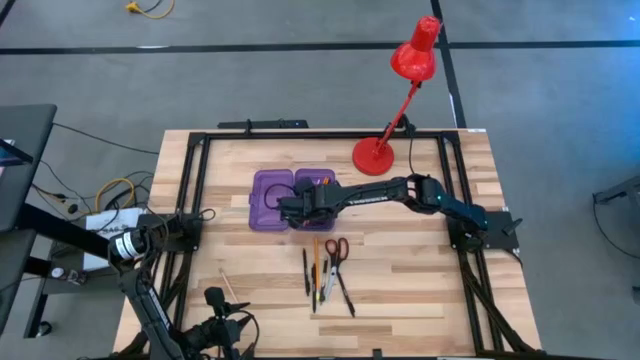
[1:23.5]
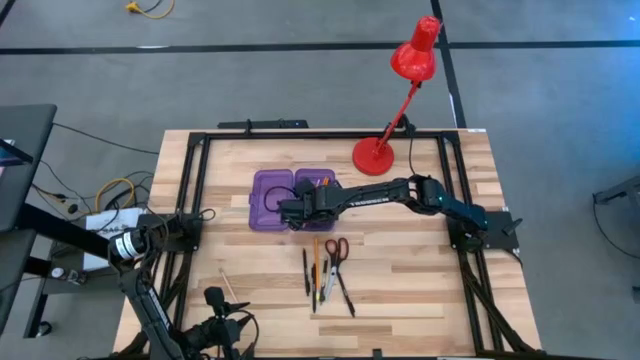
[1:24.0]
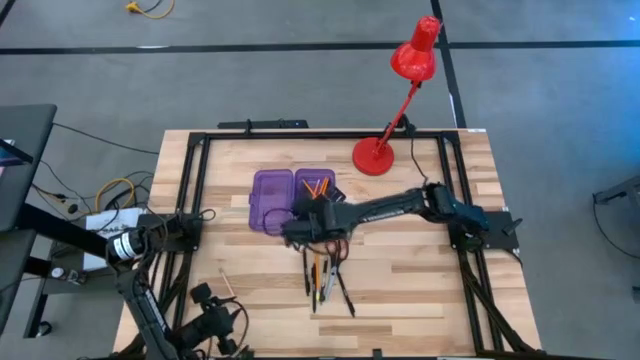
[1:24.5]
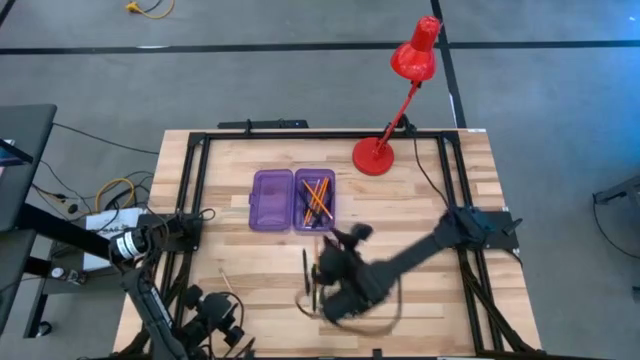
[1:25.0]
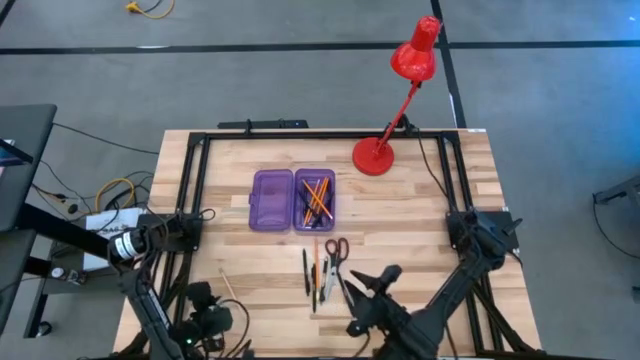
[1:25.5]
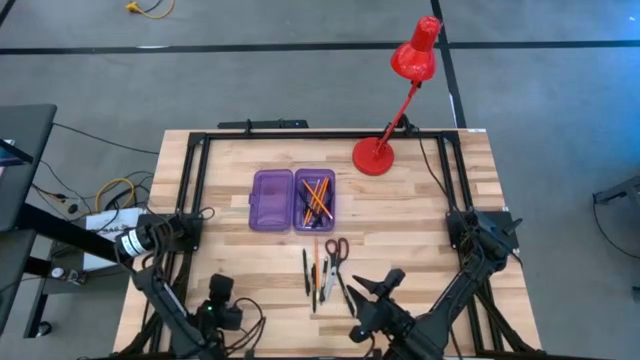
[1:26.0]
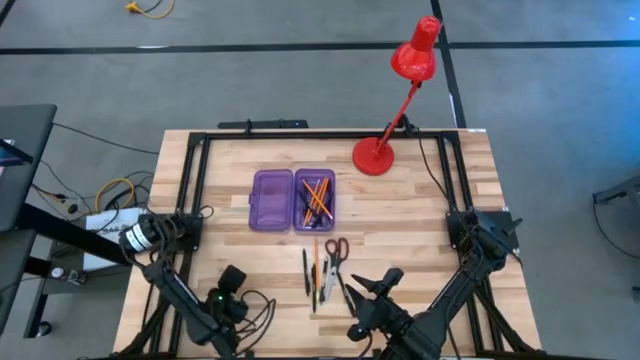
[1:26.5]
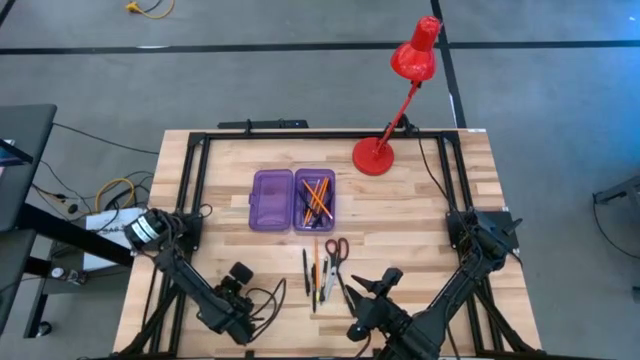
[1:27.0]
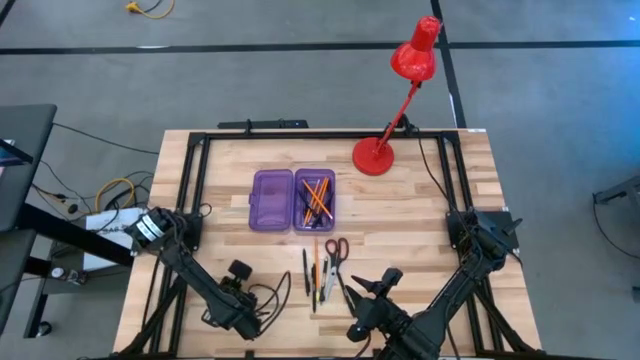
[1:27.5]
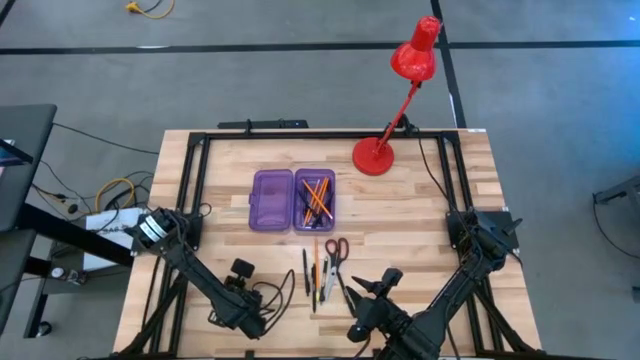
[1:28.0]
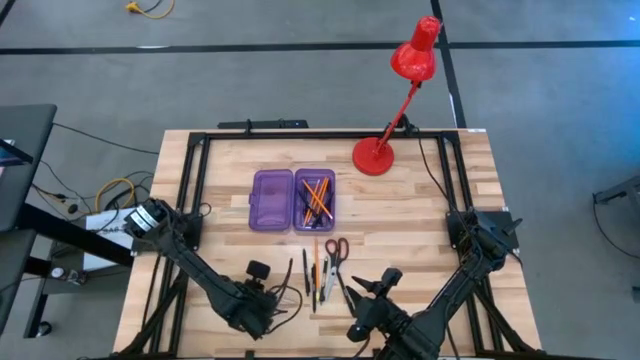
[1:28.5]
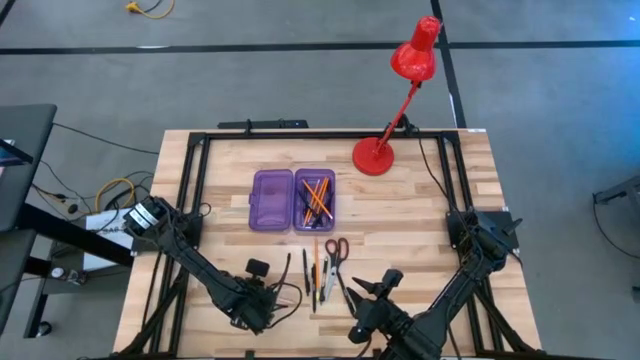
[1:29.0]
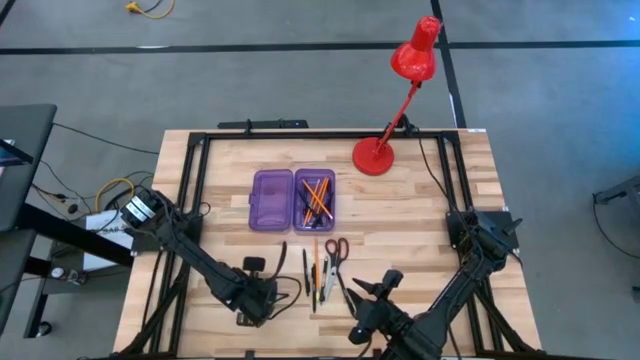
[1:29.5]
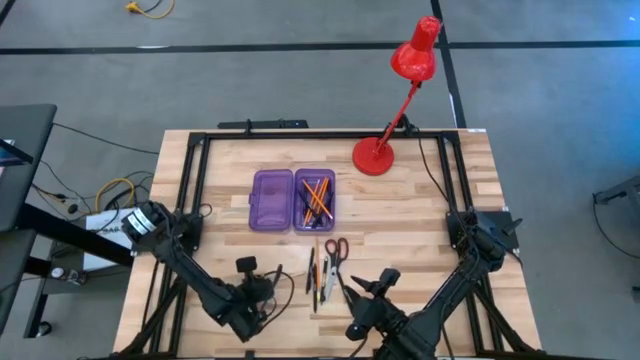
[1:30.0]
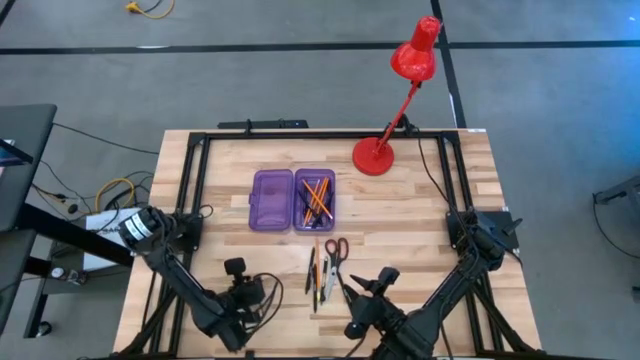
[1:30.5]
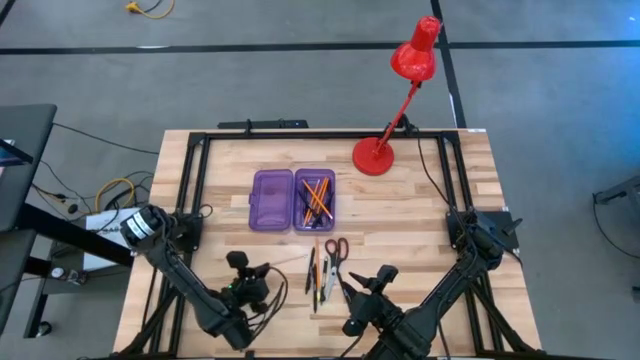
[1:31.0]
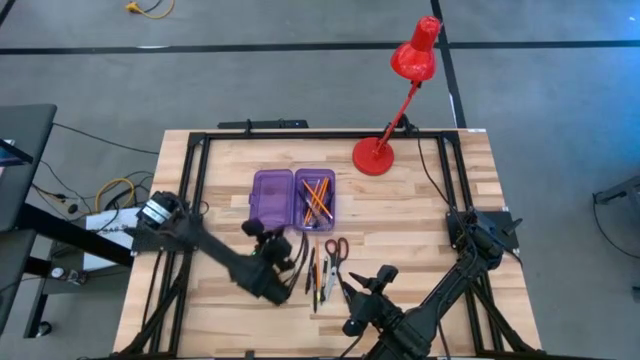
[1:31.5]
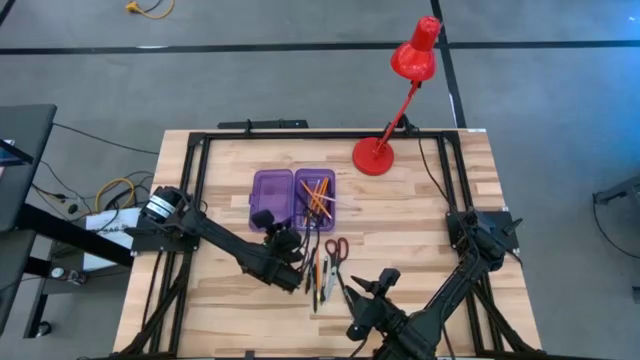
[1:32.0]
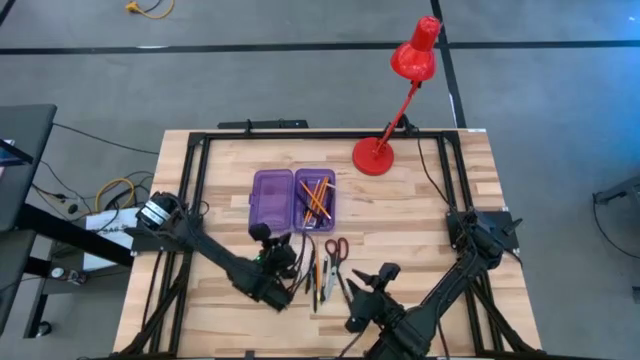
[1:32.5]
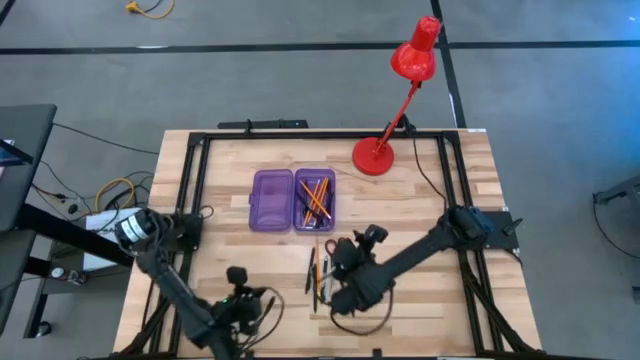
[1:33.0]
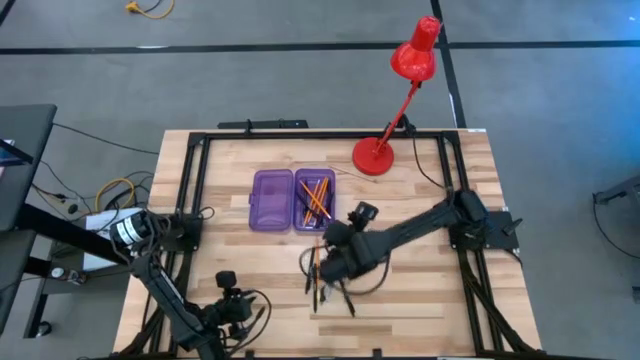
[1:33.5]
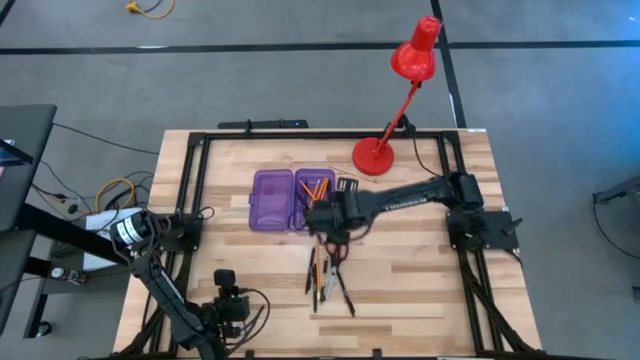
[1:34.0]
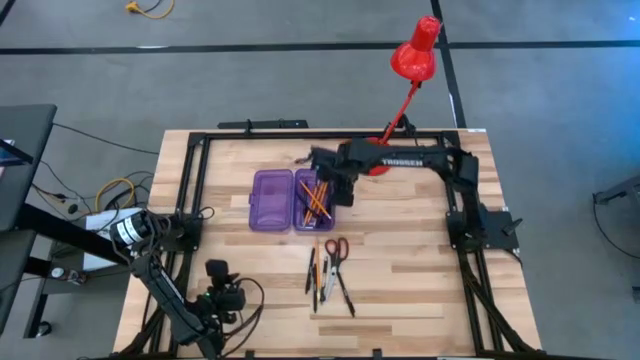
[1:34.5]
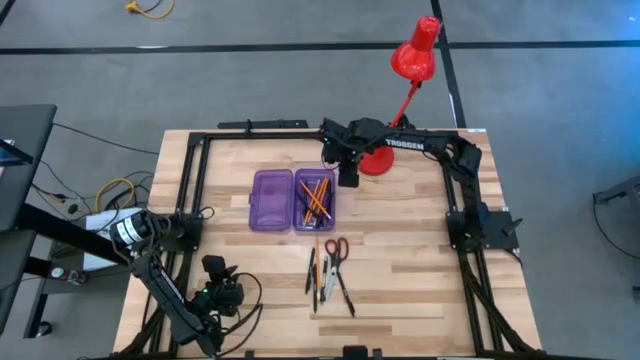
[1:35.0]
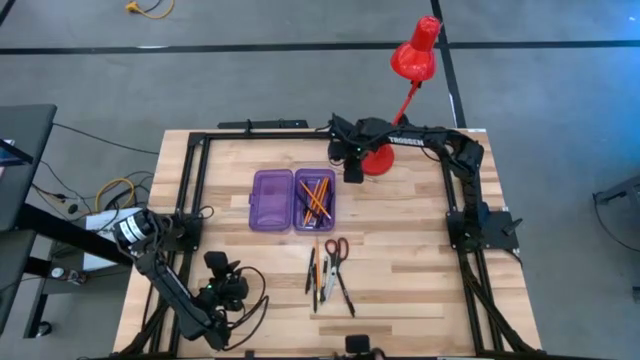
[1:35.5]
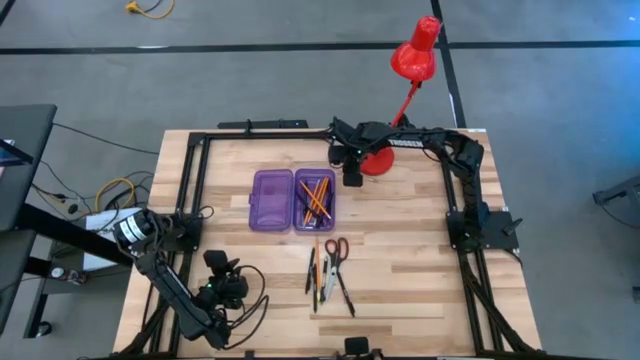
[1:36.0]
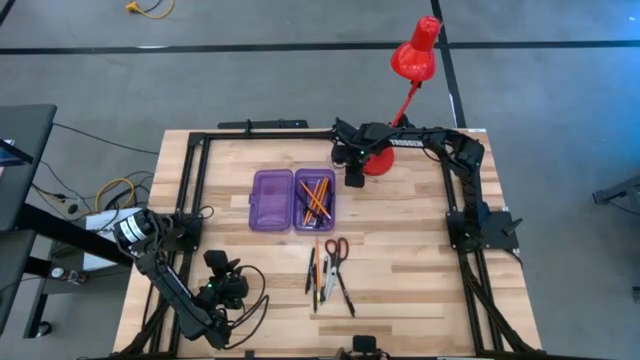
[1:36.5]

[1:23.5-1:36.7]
Task: Pick & place school supplies into a supply box
Put the pink pencil into the violet supply box

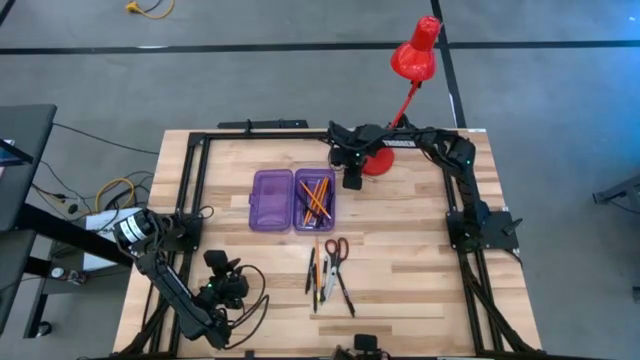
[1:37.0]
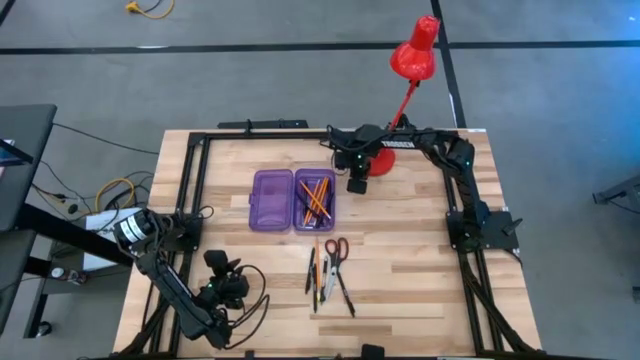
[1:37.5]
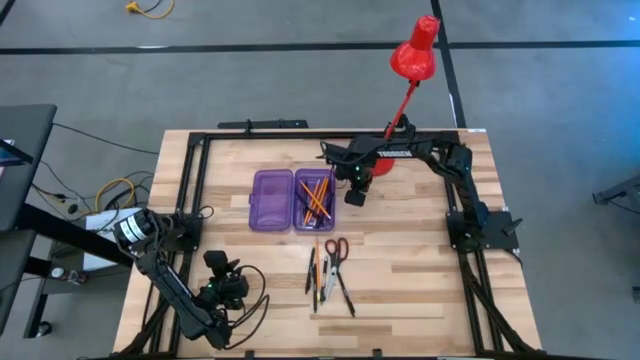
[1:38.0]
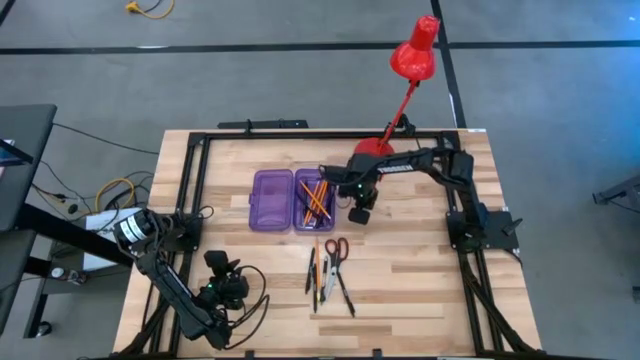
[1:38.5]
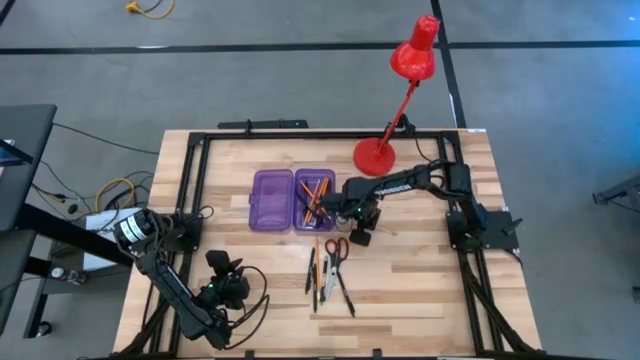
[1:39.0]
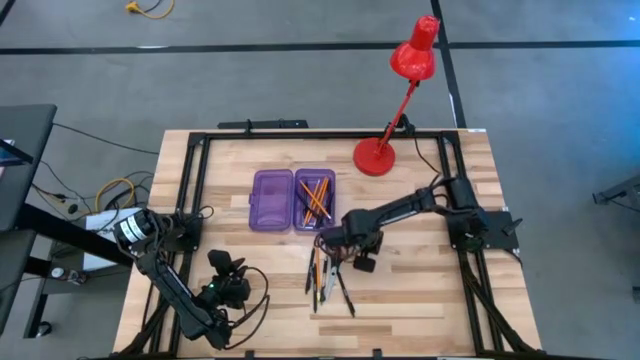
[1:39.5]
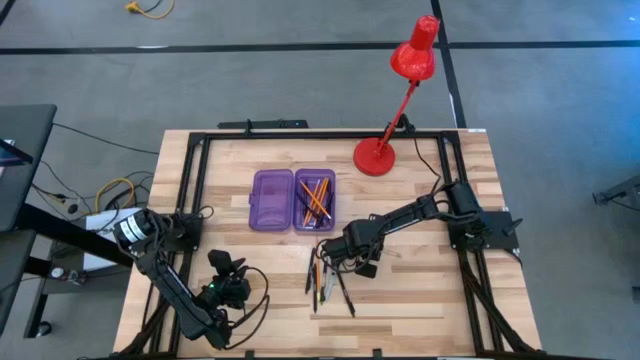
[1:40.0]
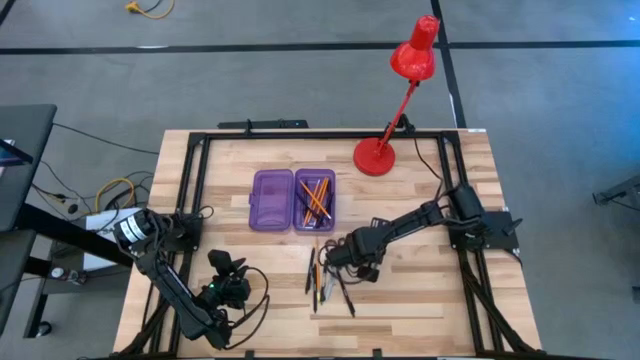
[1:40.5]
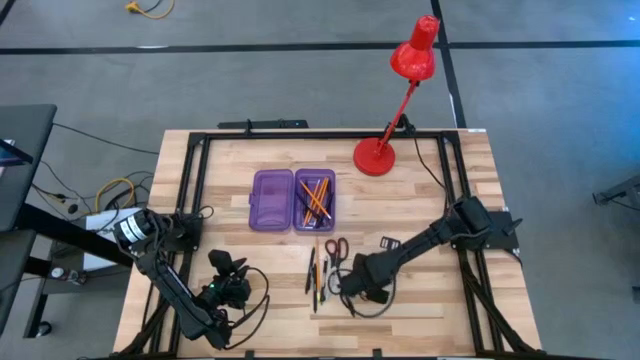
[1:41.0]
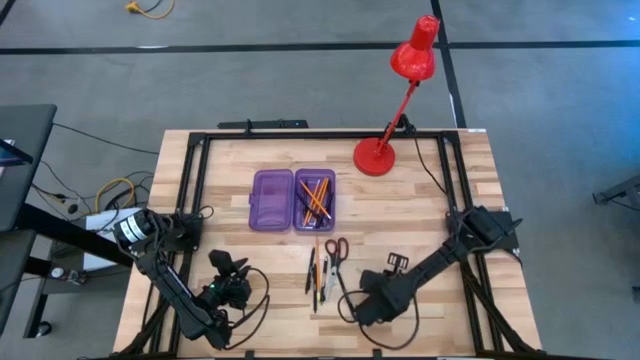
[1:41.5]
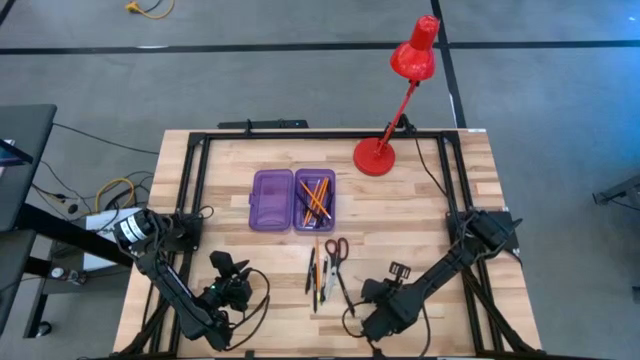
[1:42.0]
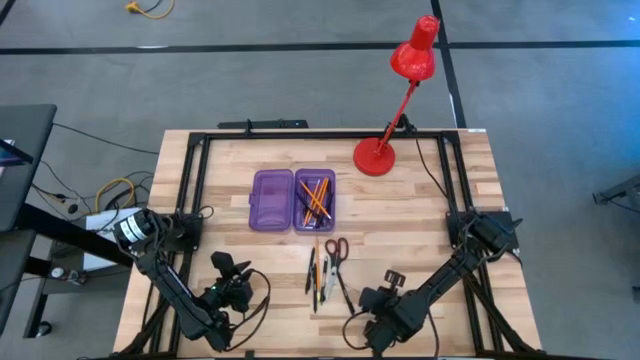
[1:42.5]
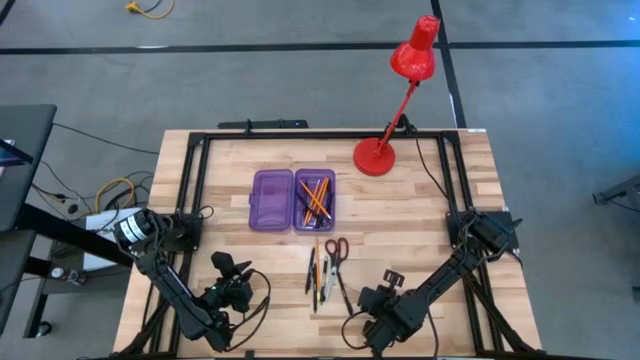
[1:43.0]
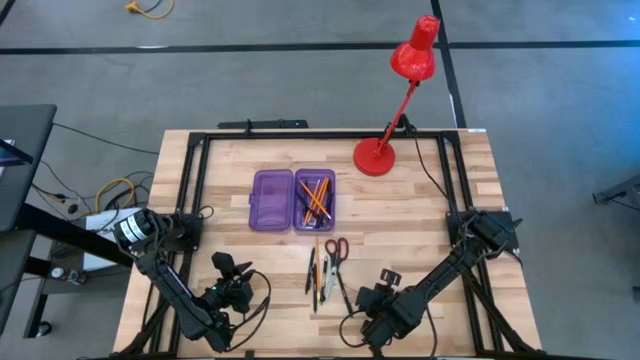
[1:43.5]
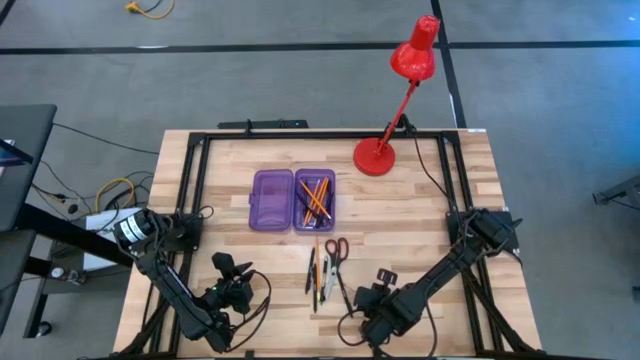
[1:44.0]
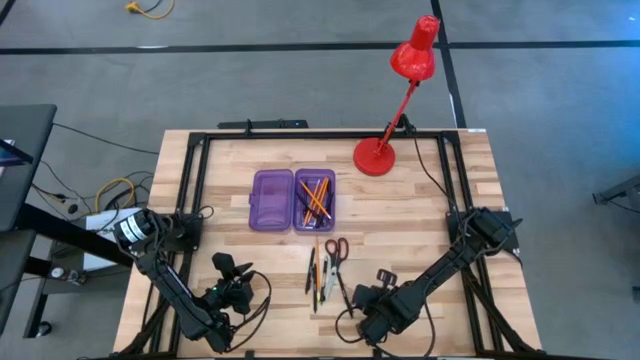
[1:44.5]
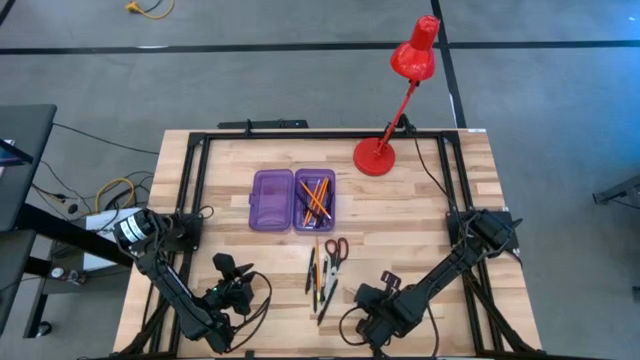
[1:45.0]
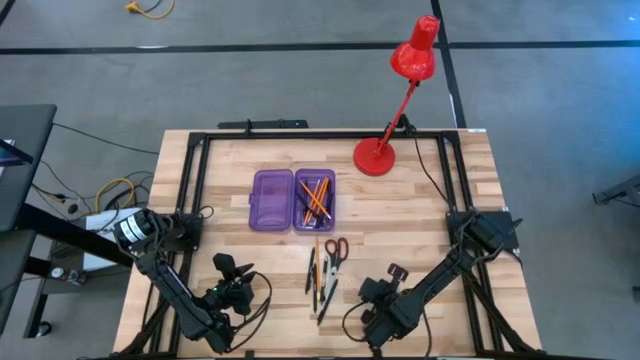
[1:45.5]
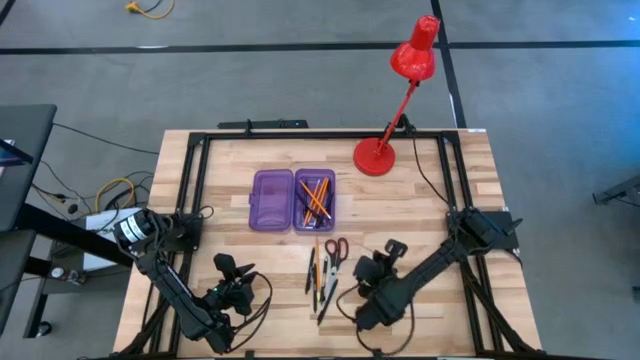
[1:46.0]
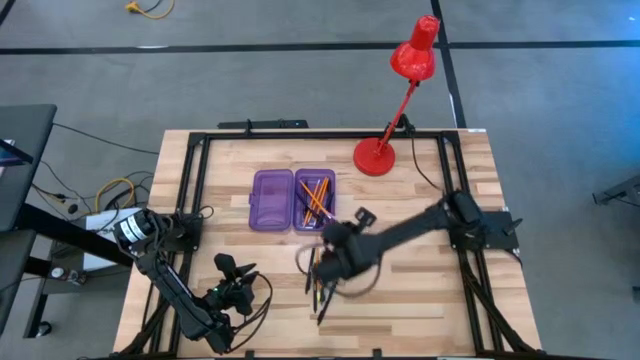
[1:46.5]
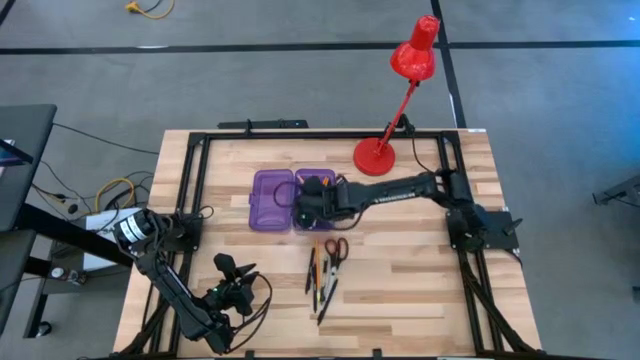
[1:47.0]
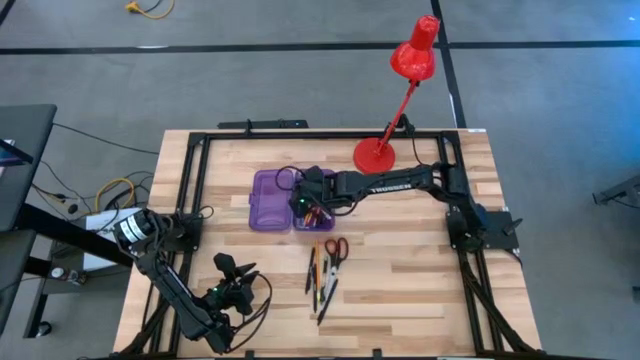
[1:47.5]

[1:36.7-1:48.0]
Put the pink pencil into the violet supply box
